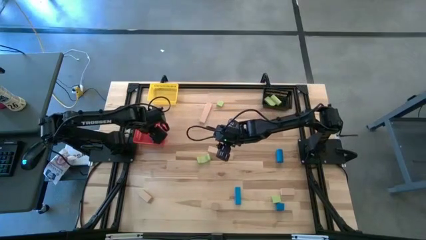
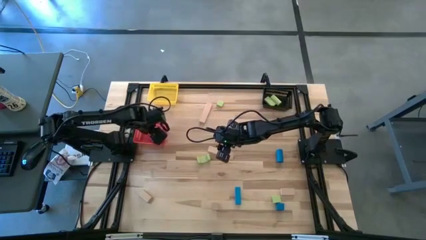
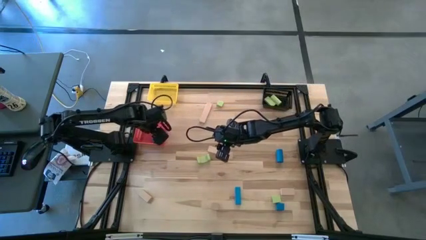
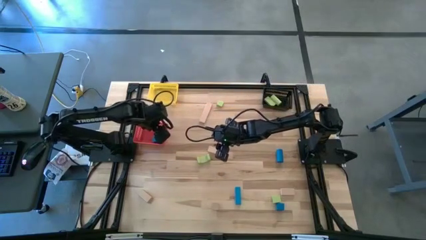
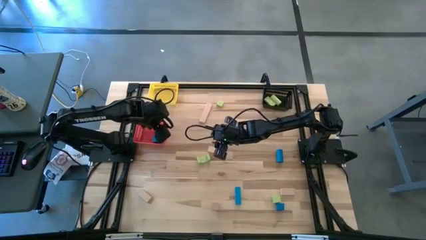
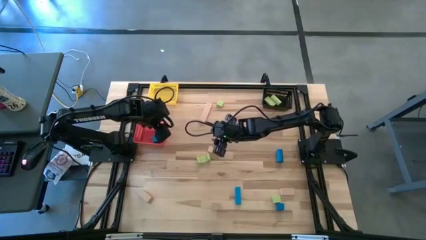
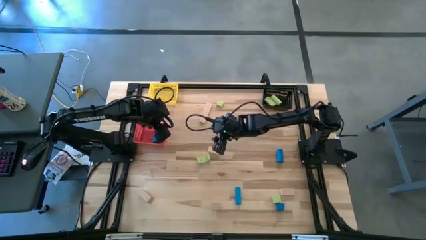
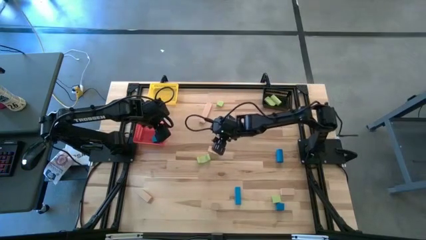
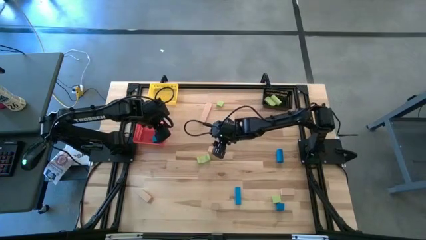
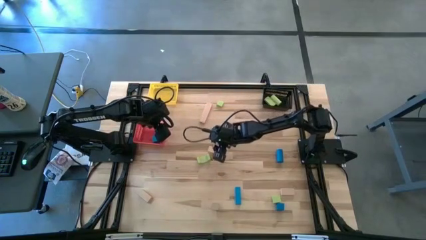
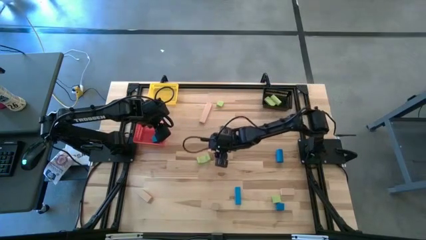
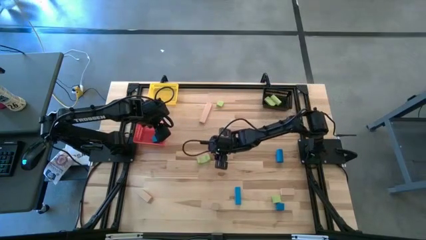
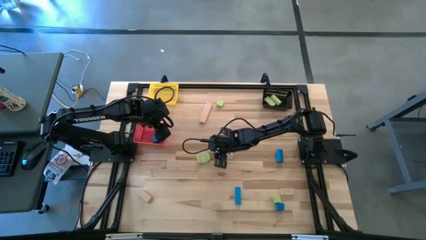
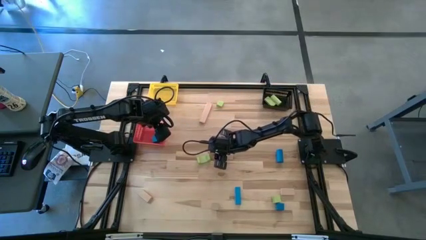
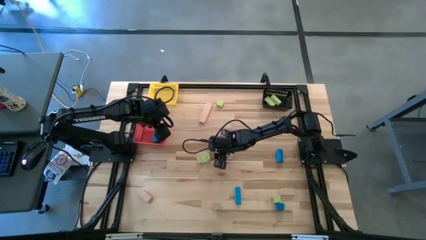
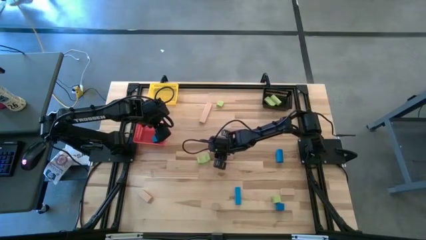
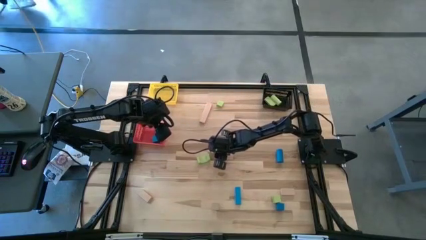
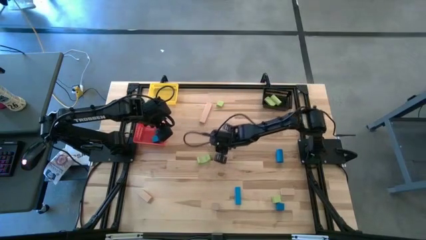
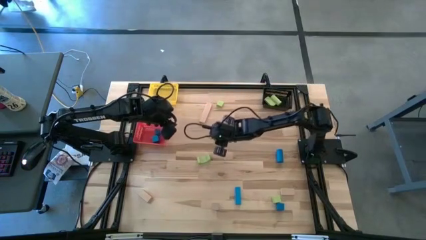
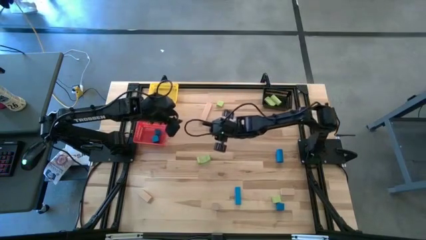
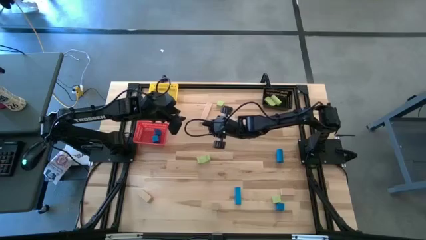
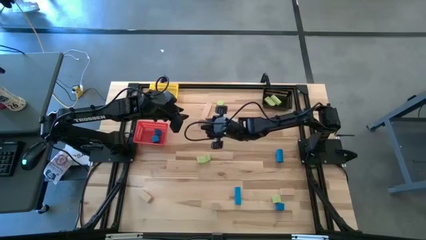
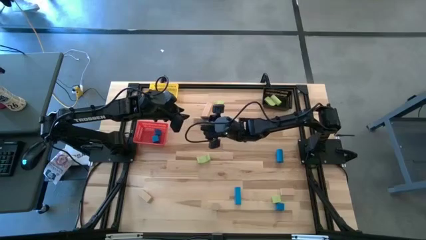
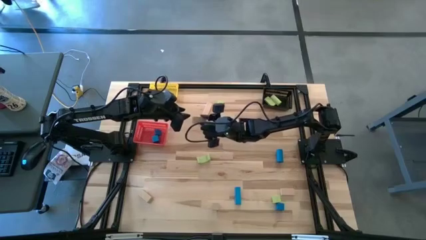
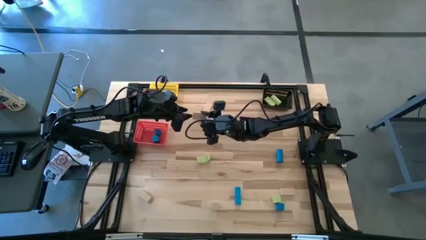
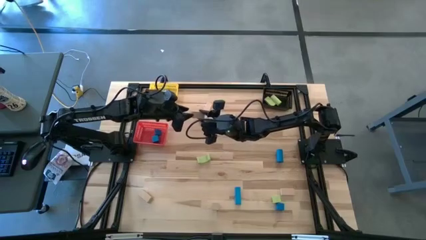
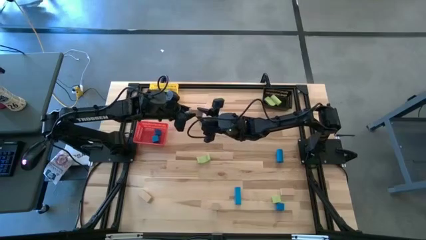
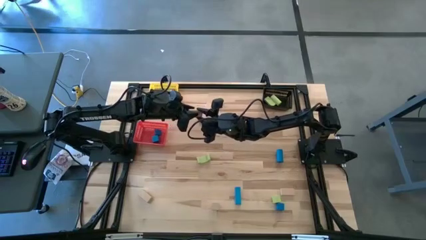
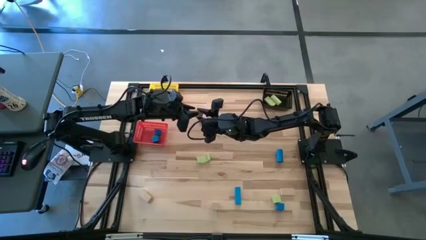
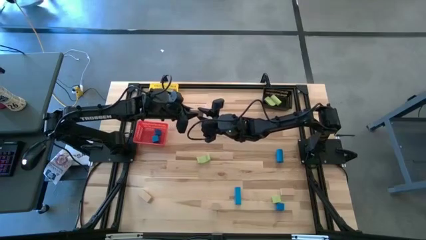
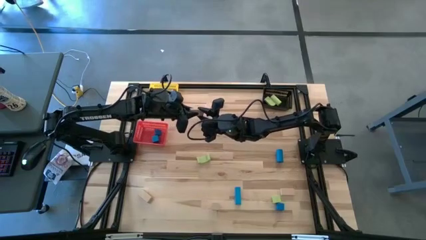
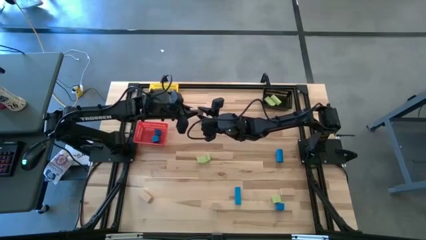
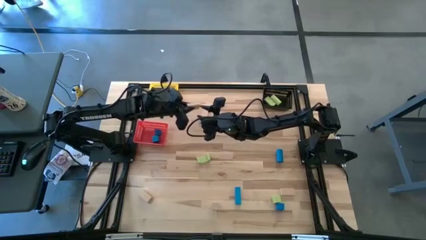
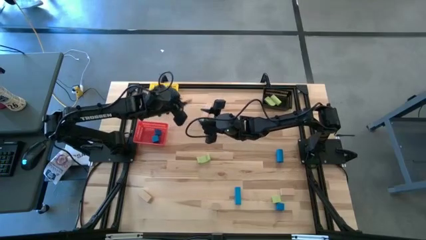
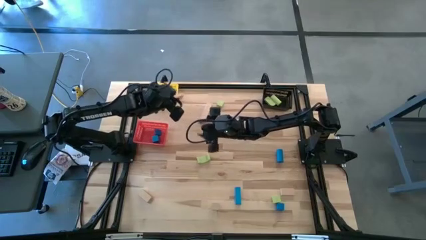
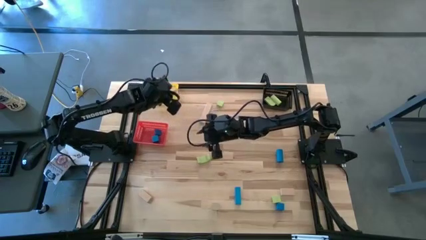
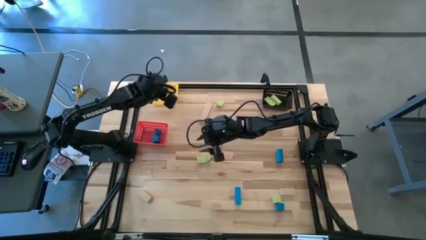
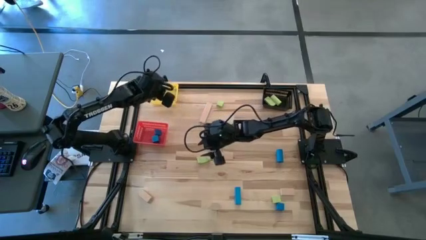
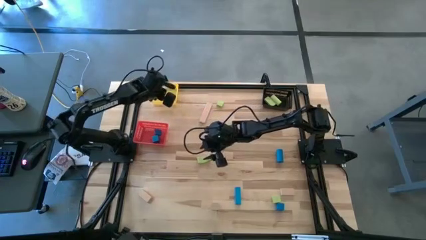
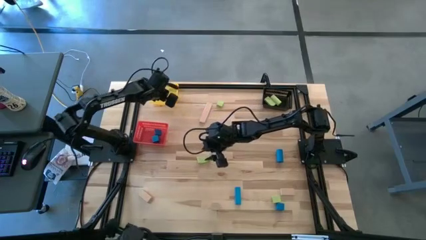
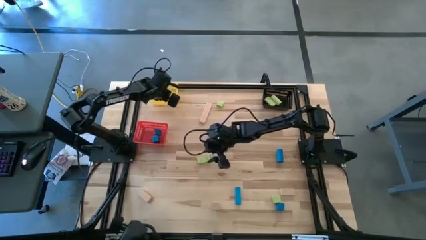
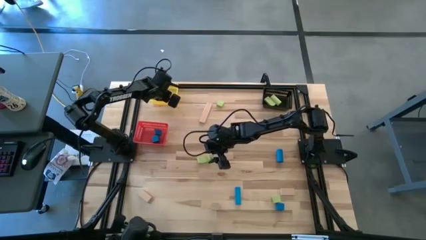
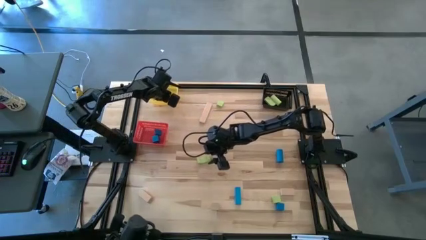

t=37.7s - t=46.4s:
Task: Sort & place blocks by color
Put the brown block into the yellow bin

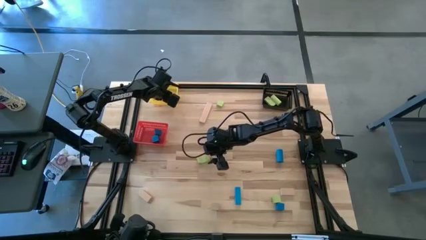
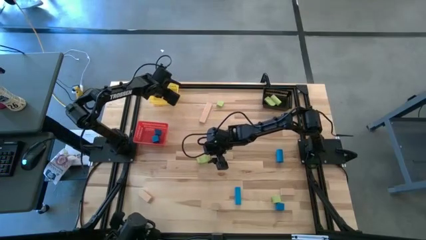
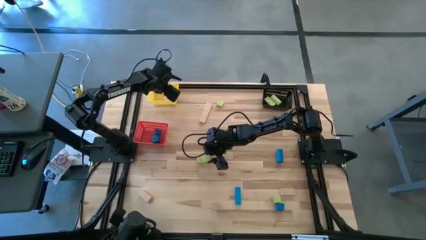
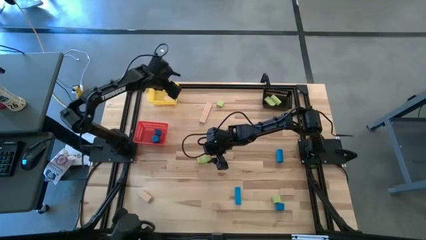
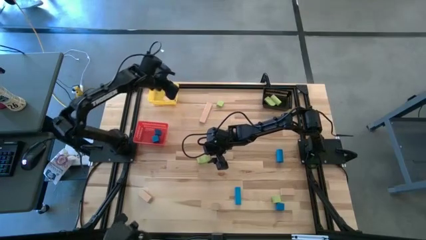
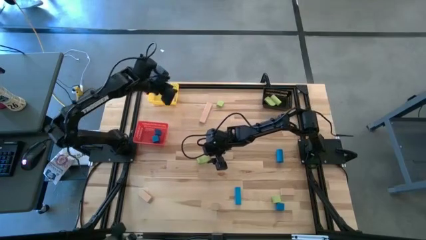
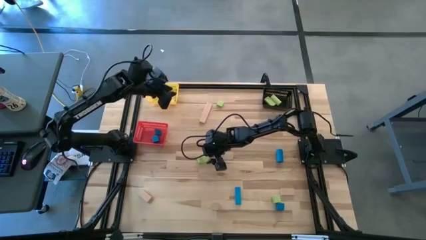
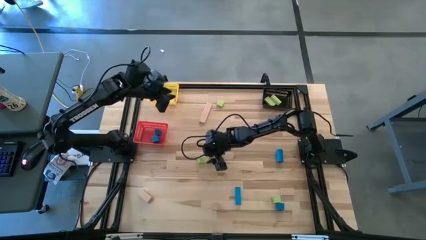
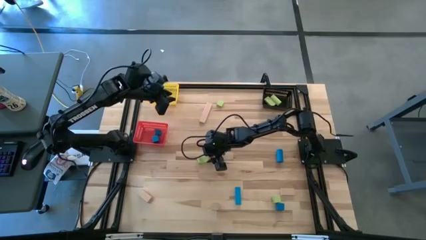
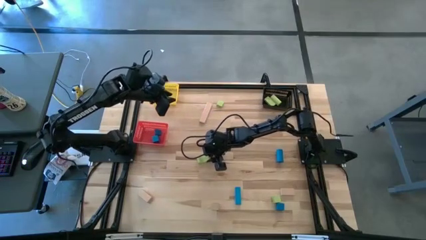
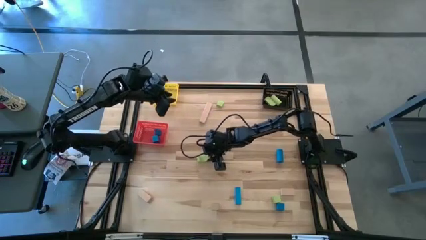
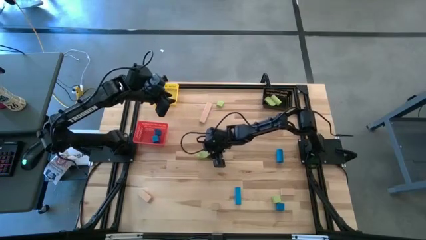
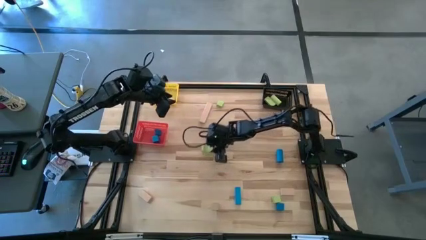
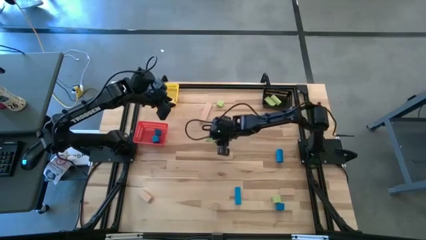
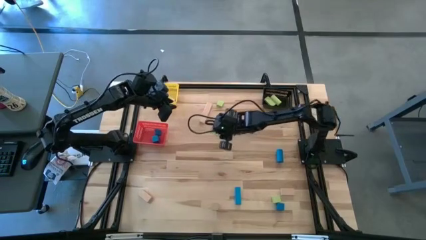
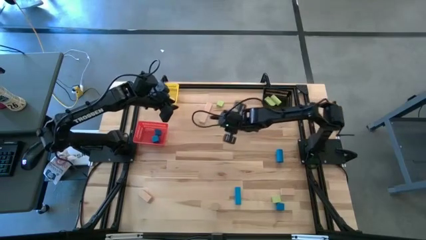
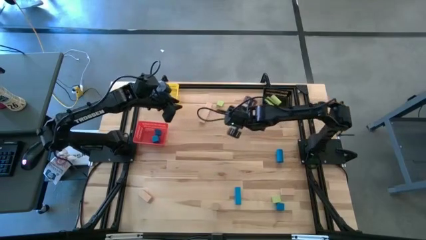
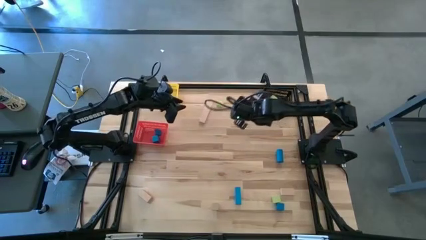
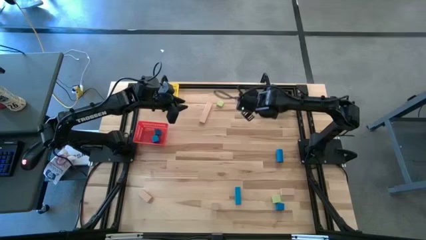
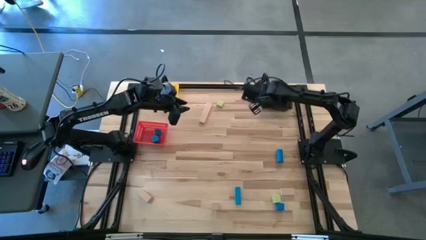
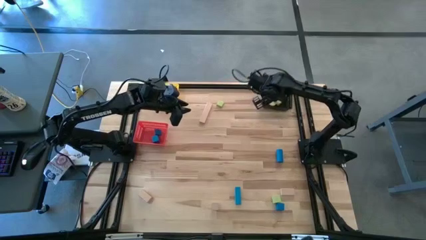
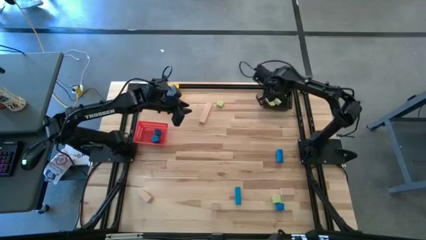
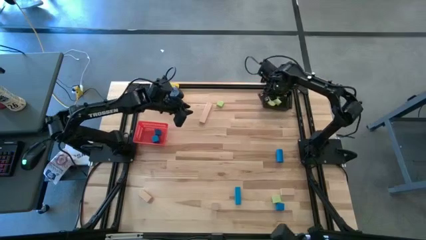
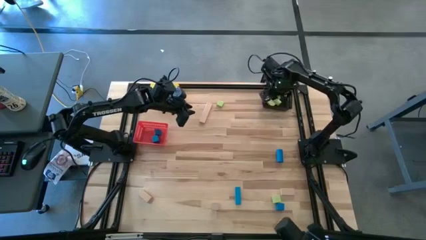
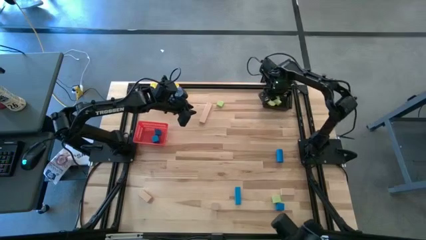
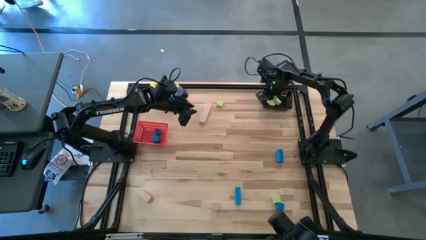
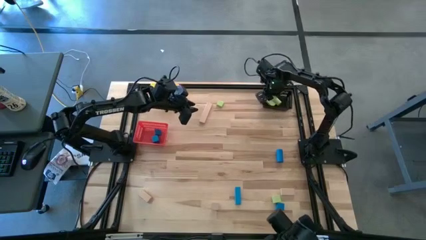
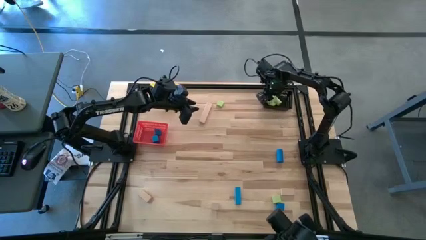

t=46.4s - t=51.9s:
Put the green arch block into the black bin

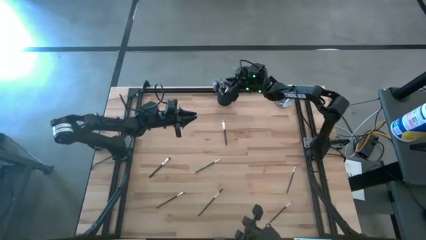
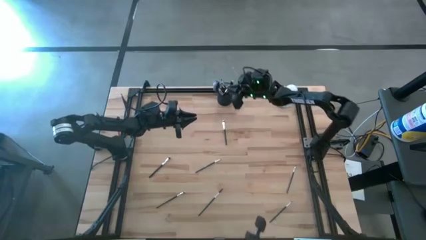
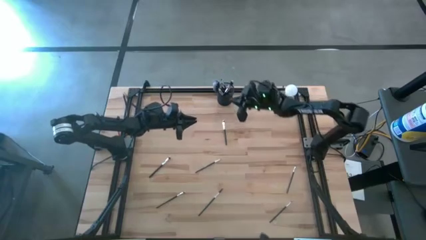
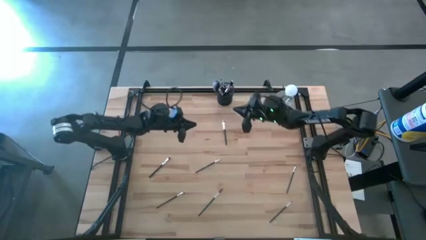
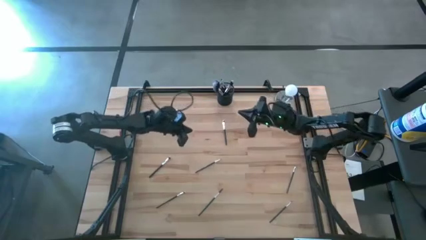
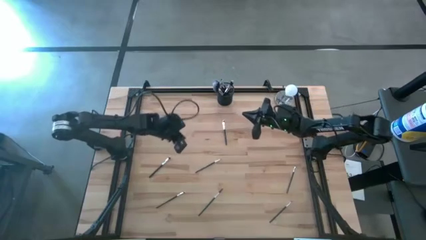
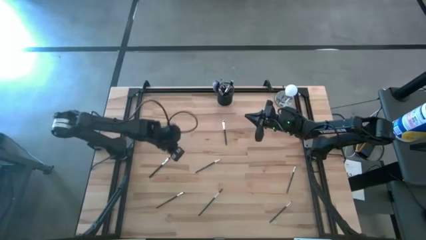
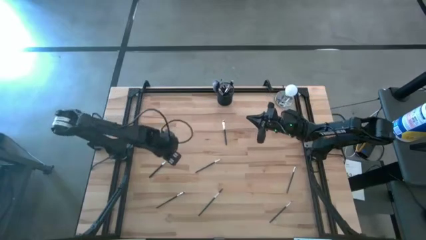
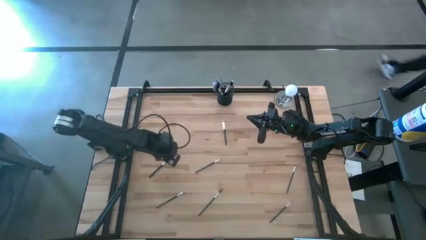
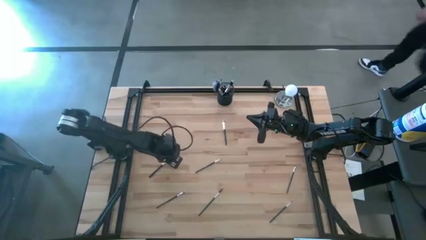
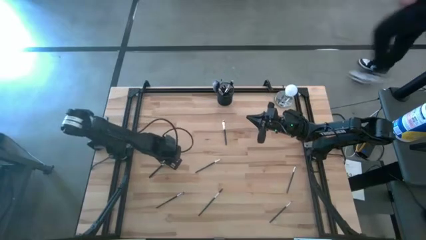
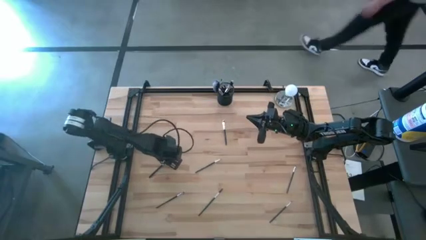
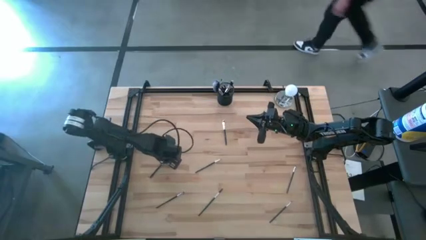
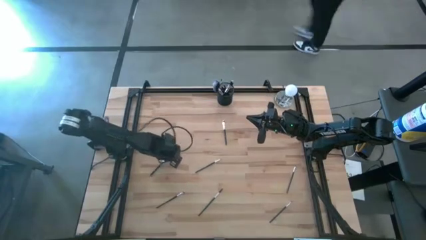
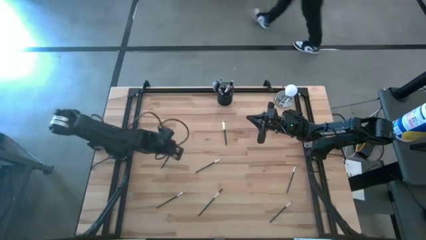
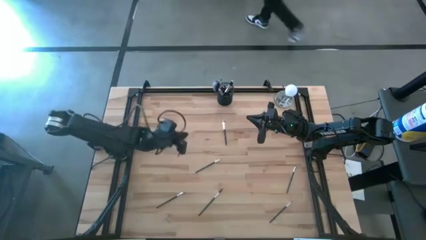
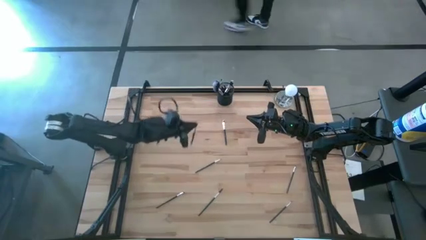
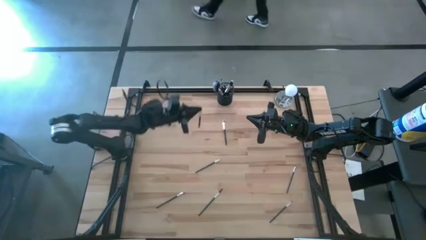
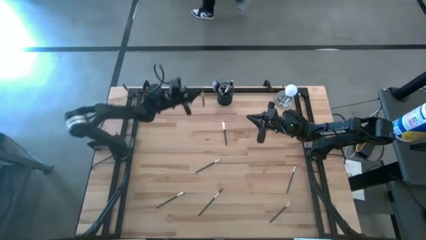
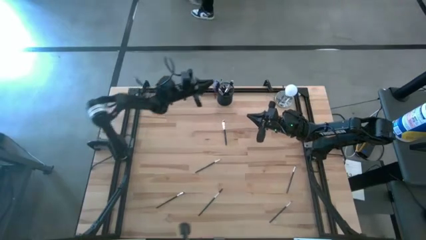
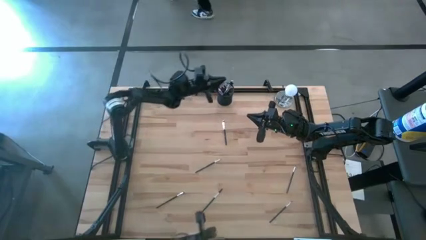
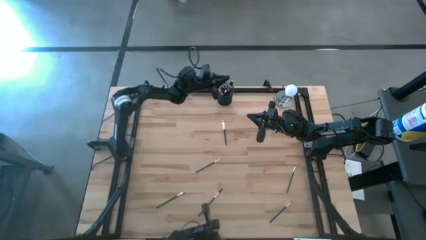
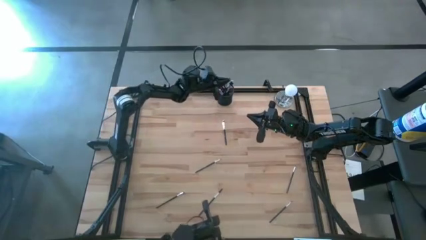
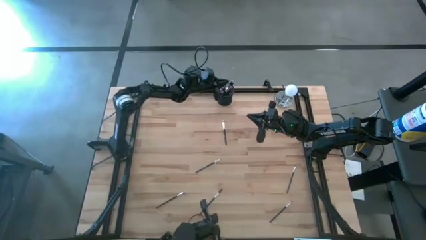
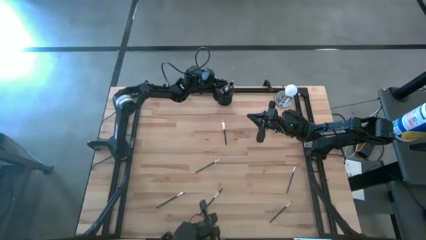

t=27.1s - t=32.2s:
Task: Put items in baskets/containers
Put the black eyeshadow brush into the black pen holder
